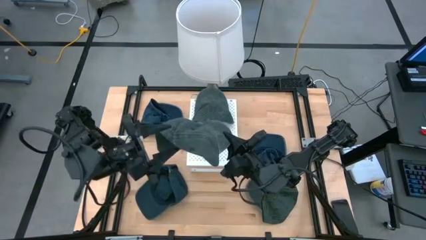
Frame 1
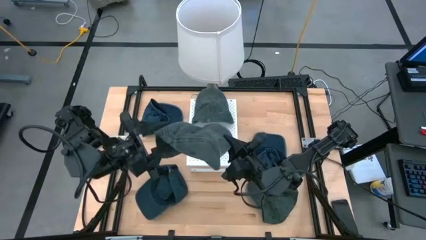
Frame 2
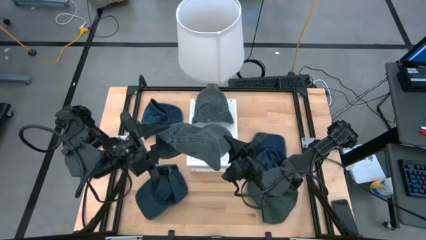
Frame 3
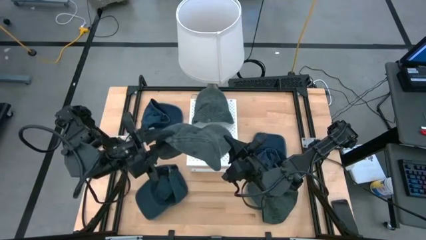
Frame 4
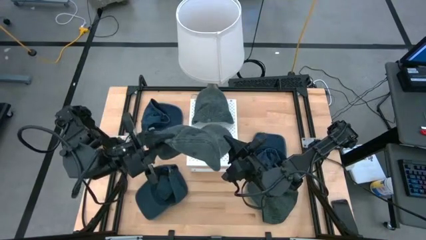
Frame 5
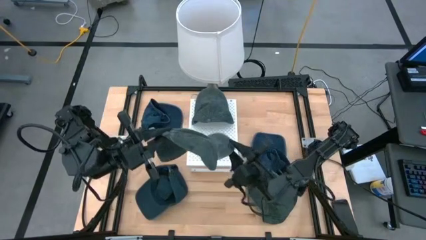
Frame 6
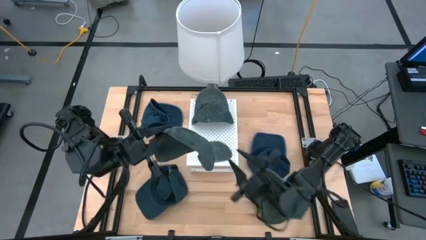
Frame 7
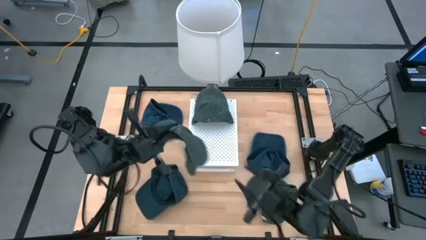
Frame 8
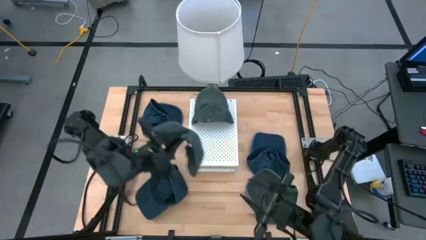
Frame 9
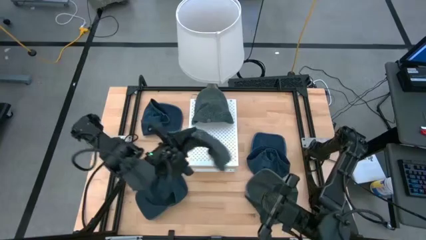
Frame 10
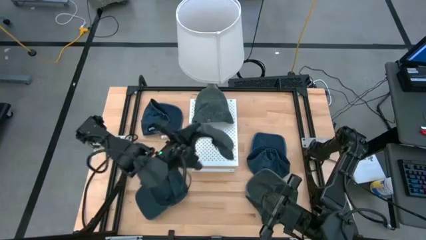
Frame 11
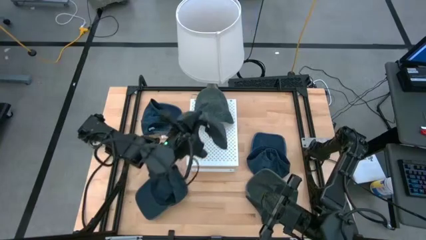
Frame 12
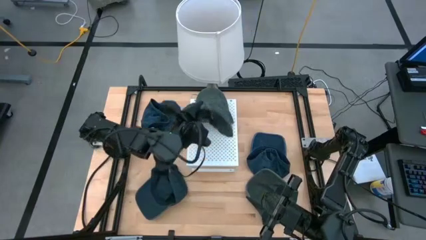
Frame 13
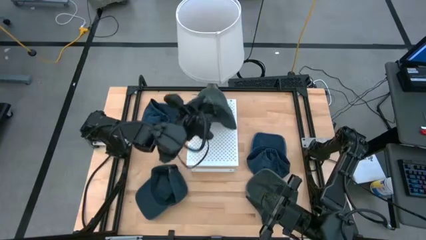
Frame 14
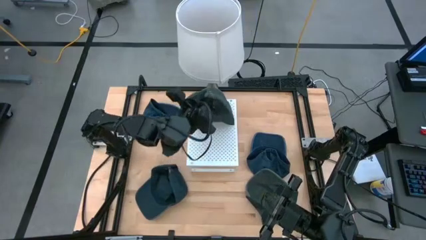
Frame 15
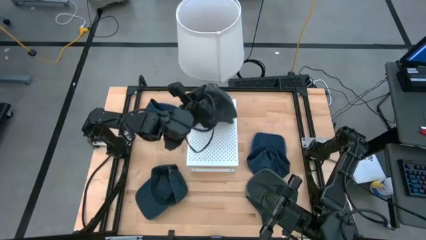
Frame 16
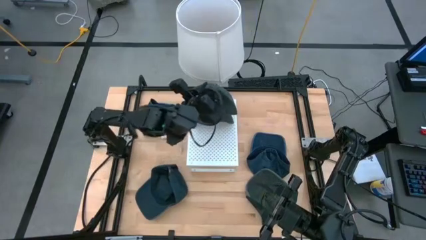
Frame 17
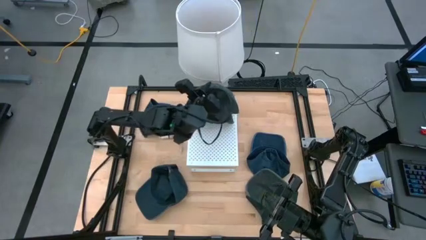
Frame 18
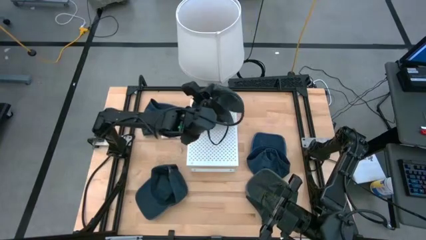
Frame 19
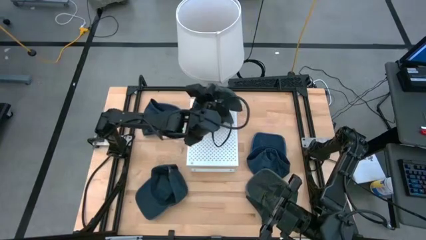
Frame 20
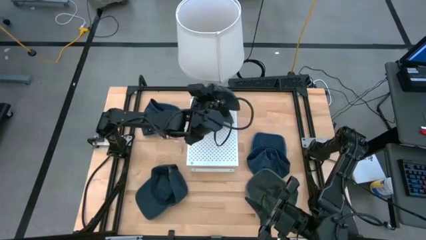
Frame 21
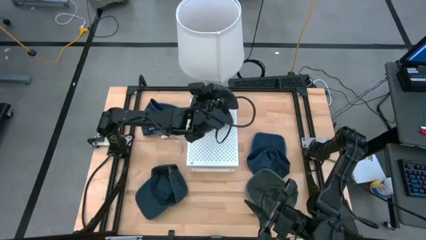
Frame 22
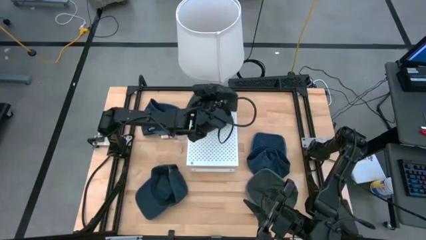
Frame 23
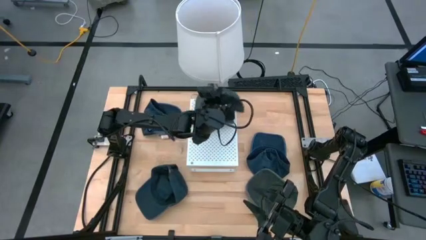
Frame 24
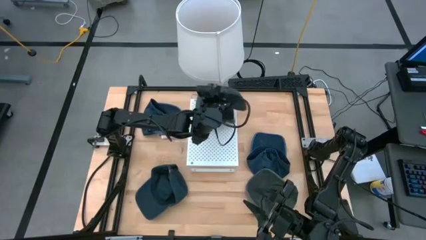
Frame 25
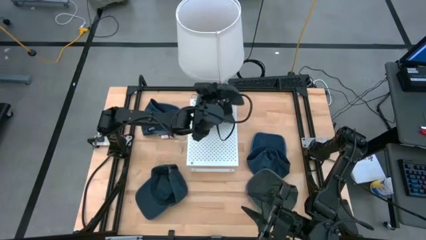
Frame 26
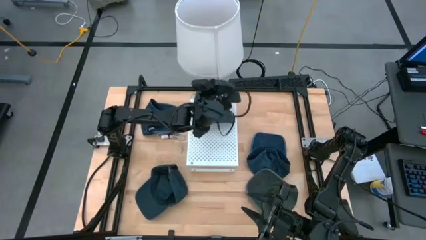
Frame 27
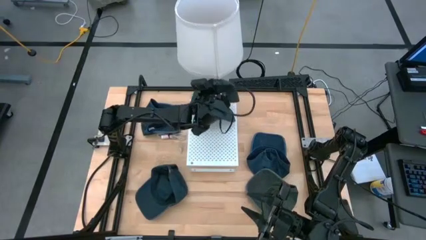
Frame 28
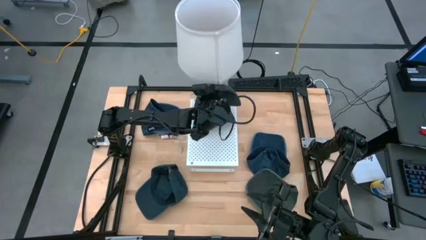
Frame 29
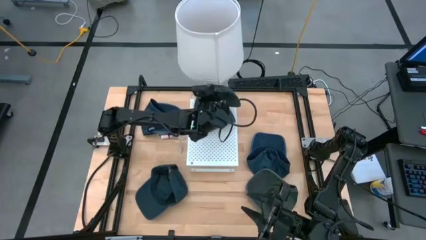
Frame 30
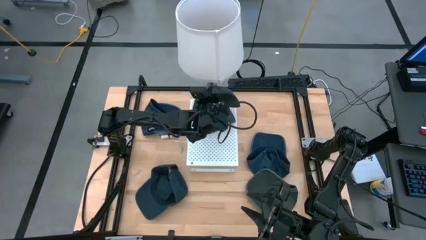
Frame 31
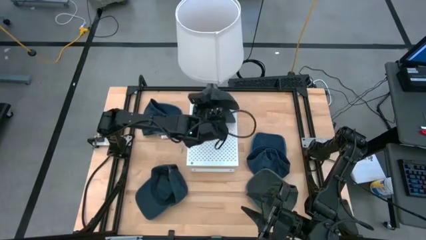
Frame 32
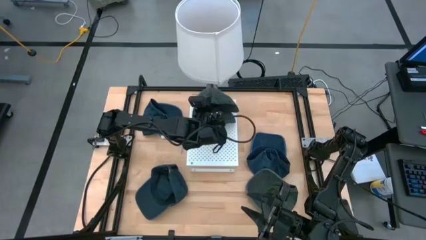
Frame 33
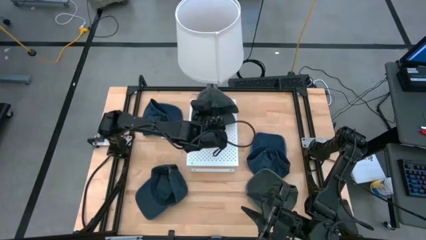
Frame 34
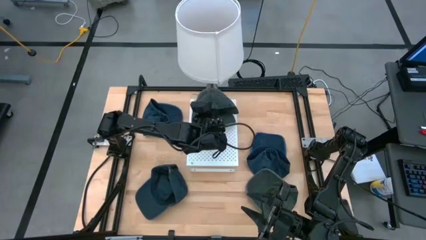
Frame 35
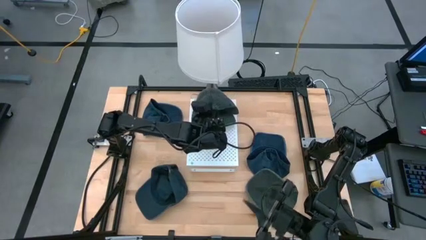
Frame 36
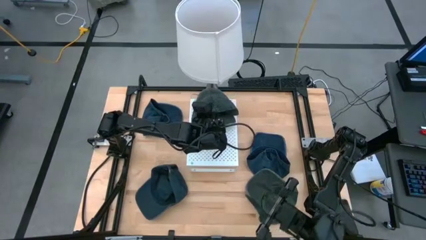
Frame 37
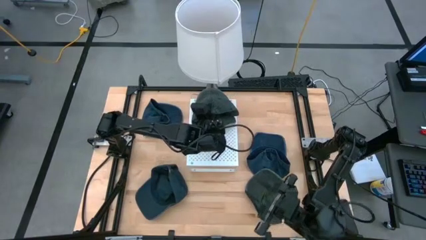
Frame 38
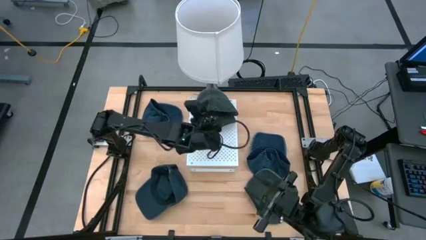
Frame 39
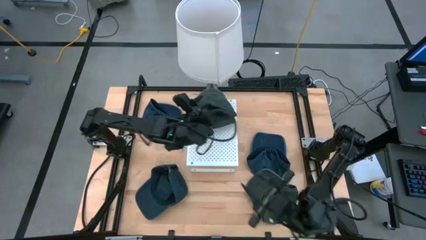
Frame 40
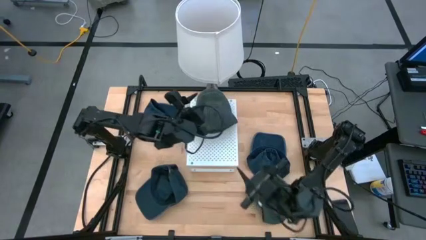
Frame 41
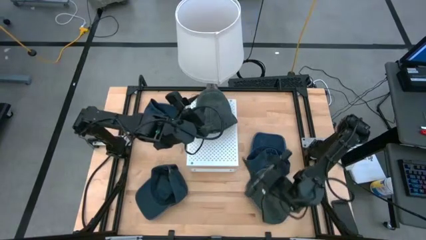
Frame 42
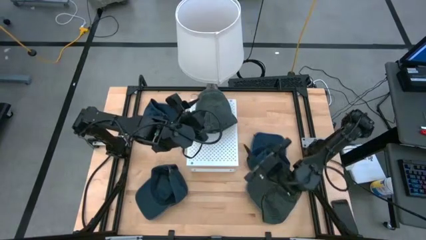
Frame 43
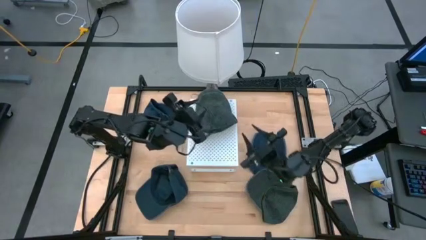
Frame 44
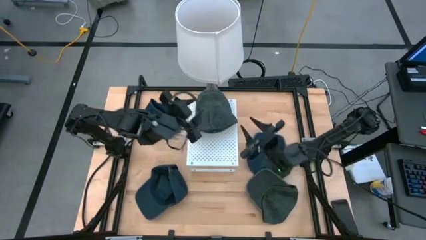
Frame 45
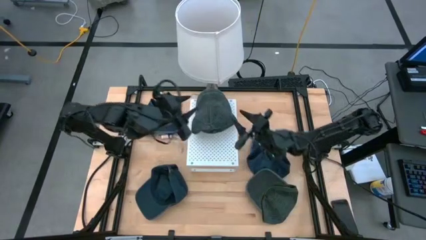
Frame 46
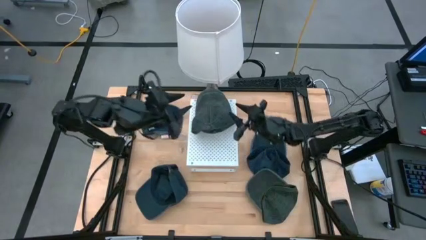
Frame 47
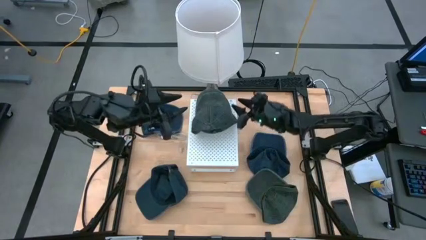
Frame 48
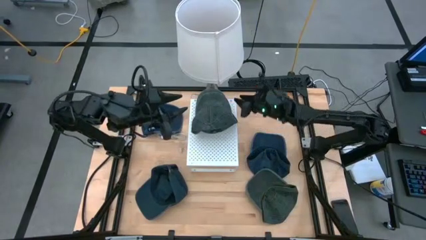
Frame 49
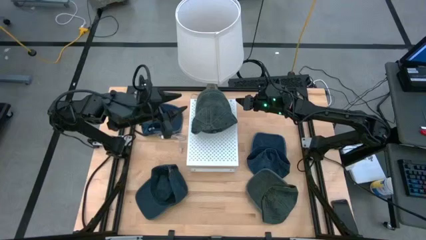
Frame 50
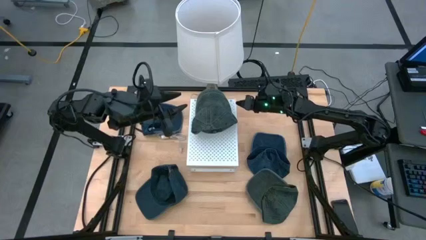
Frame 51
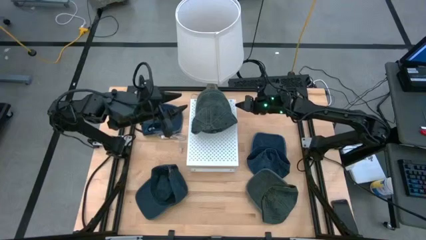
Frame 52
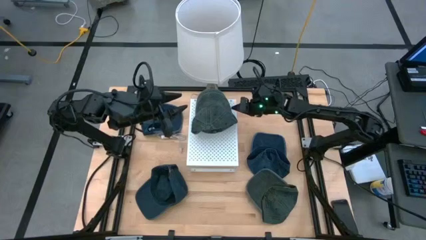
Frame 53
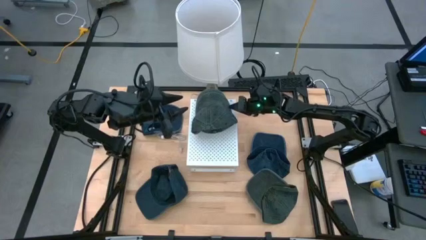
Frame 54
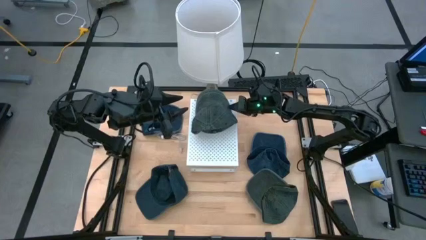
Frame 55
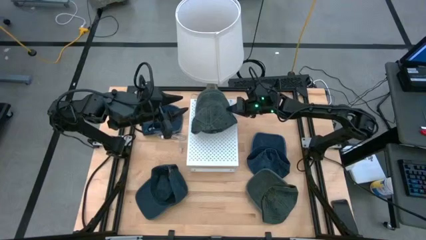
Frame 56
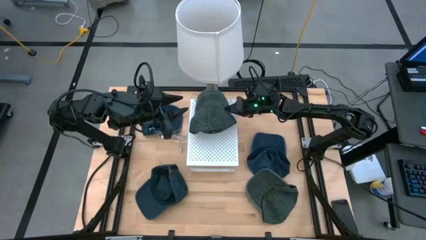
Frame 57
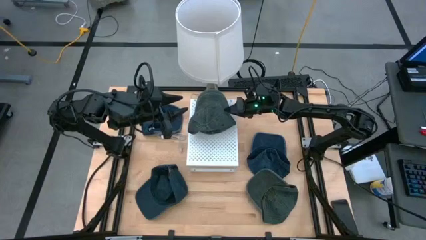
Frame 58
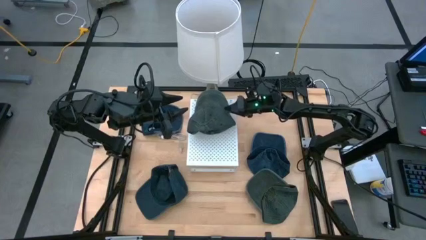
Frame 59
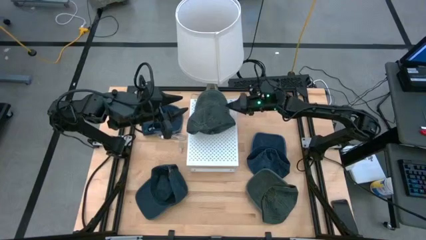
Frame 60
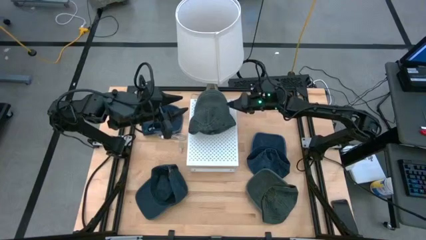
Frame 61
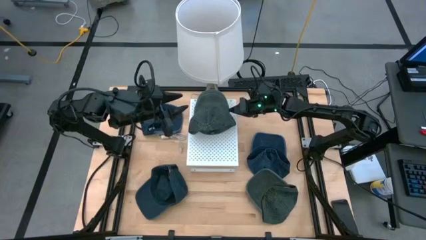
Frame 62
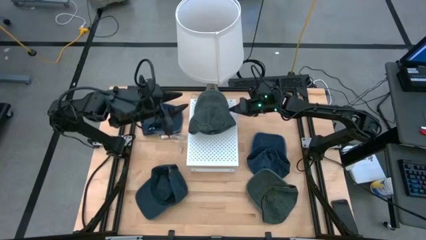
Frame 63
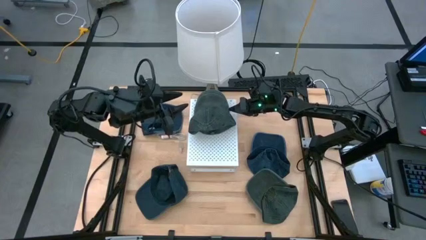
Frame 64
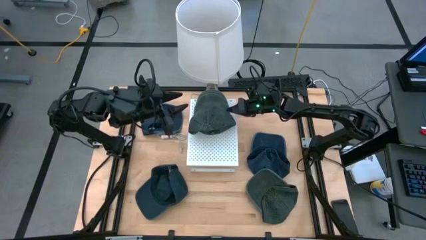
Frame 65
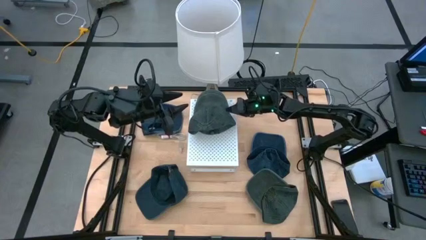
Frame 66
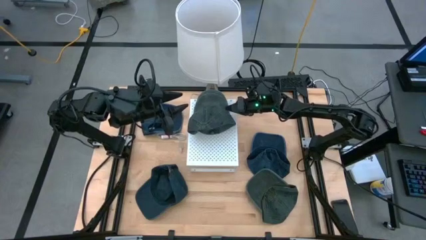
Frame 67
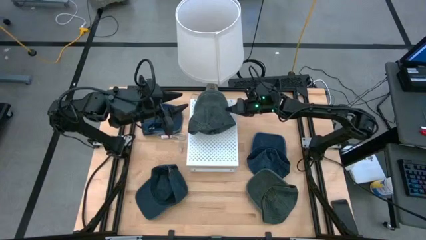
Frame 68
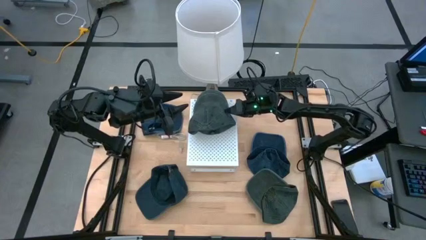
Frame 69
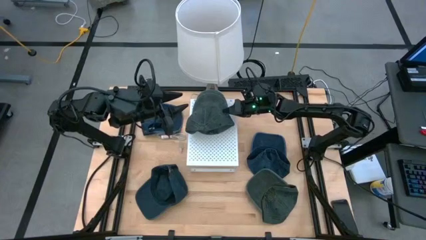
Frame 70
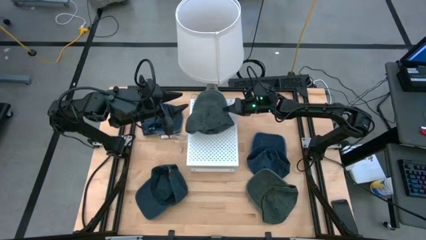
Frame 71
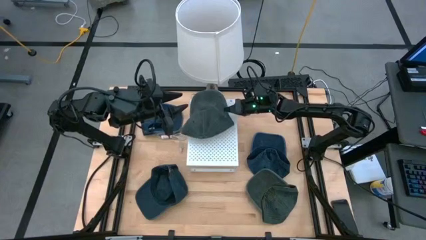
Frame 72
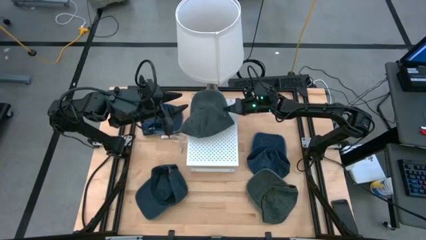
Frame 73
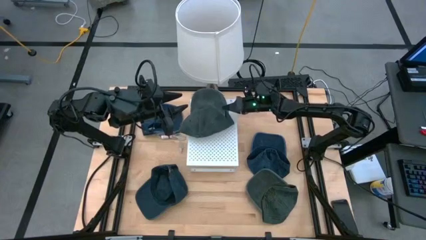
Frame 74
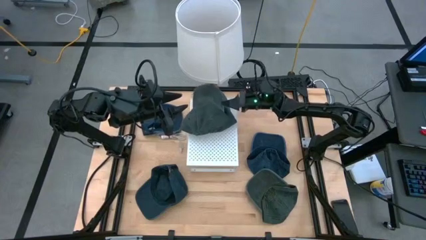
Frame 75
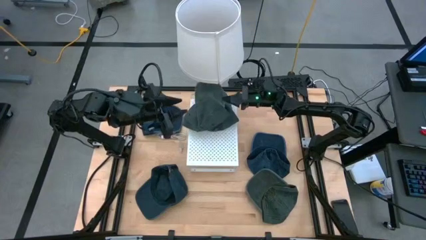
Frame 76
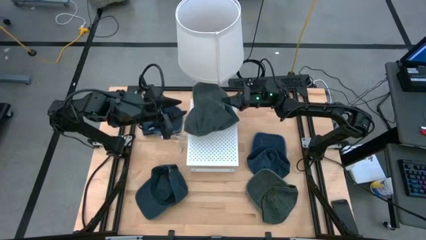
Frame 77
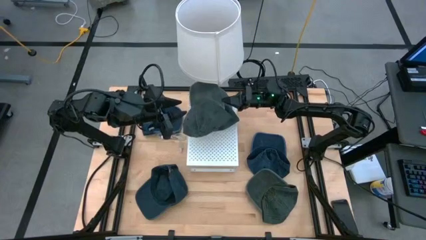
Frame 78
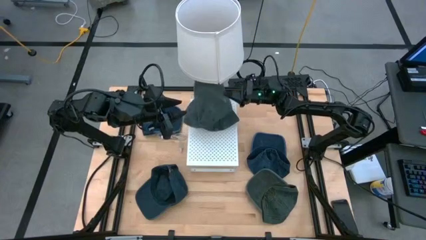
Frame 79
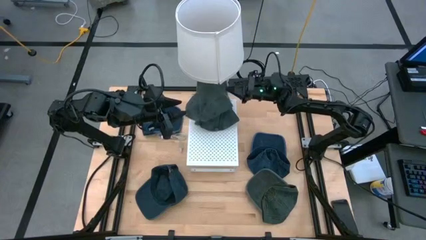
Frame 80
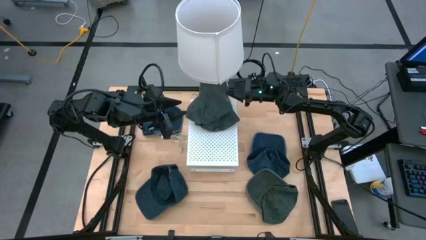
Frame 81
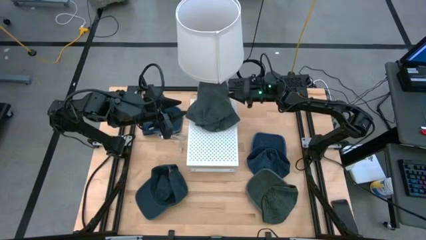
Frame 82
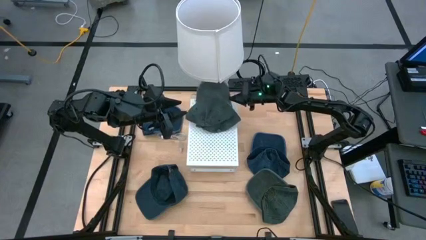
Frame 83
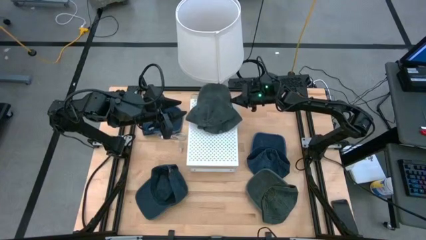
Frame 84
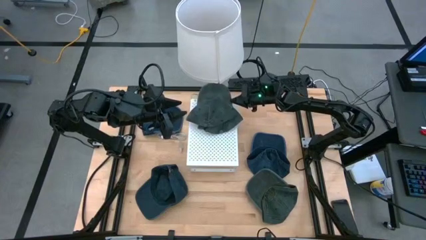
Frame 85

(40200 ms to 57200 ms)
Task: Pick & Place hat
Stack the top gray cap on the gray cap on the shelf
